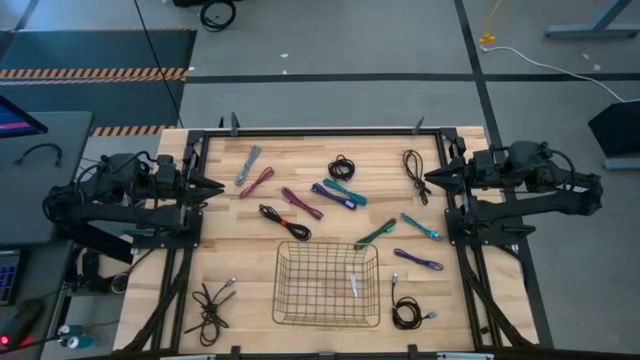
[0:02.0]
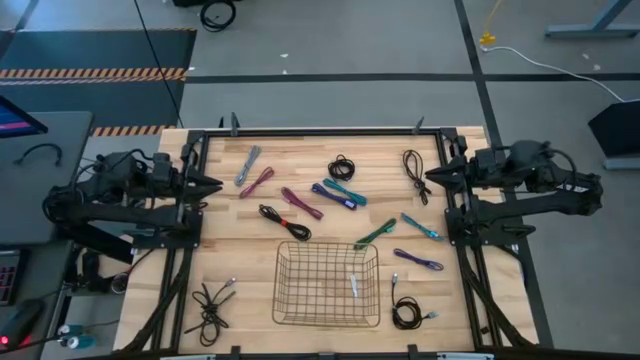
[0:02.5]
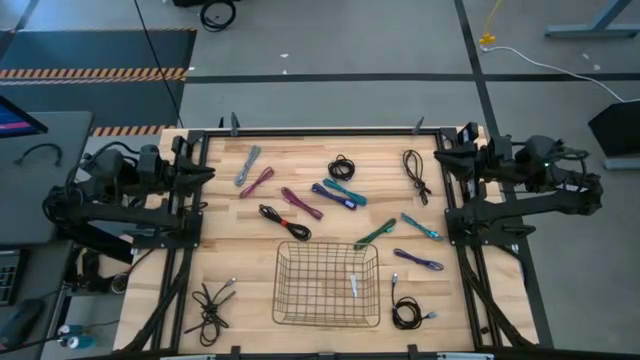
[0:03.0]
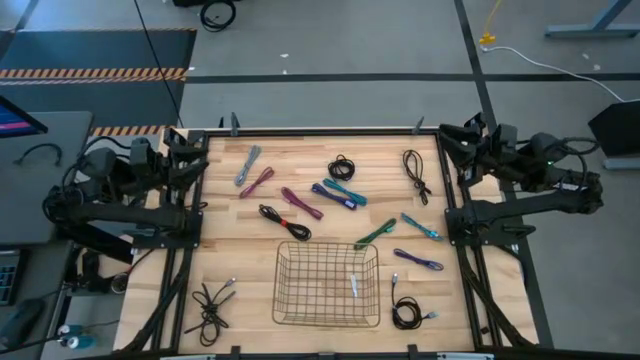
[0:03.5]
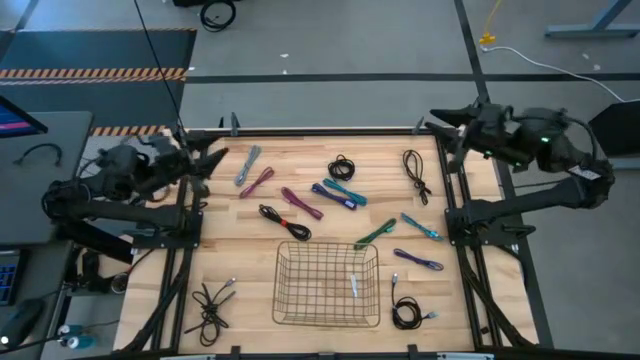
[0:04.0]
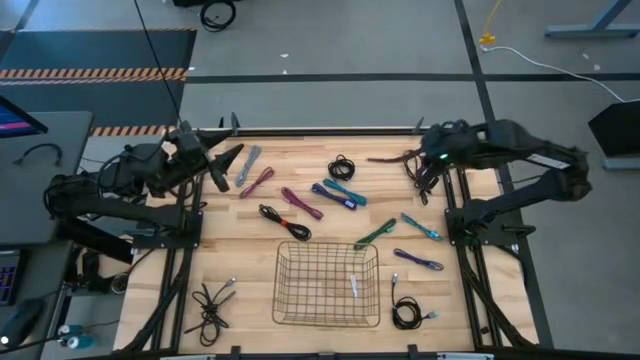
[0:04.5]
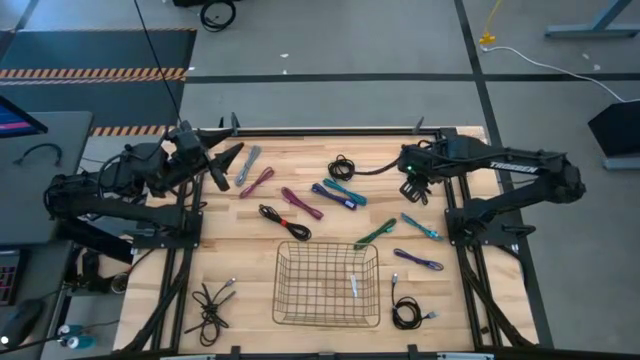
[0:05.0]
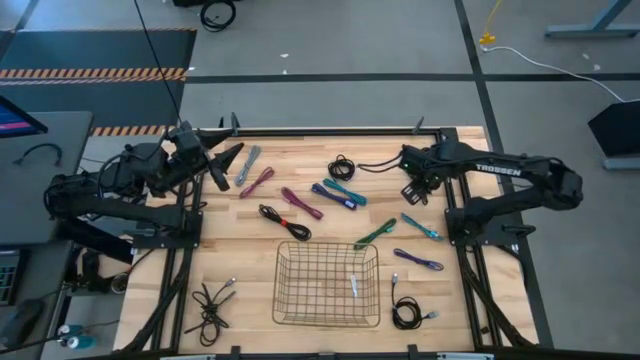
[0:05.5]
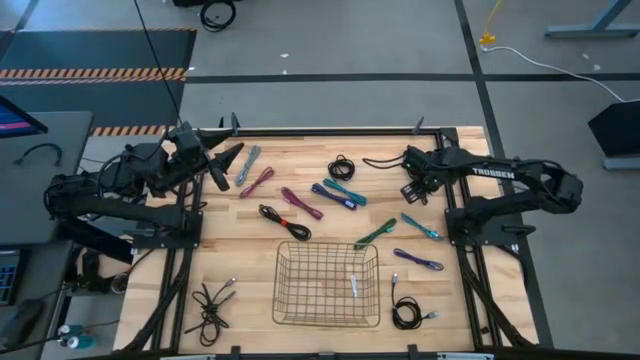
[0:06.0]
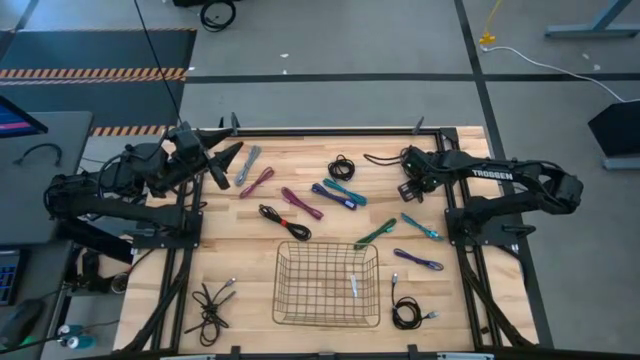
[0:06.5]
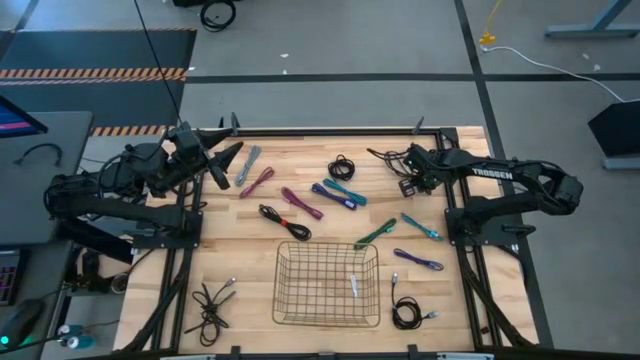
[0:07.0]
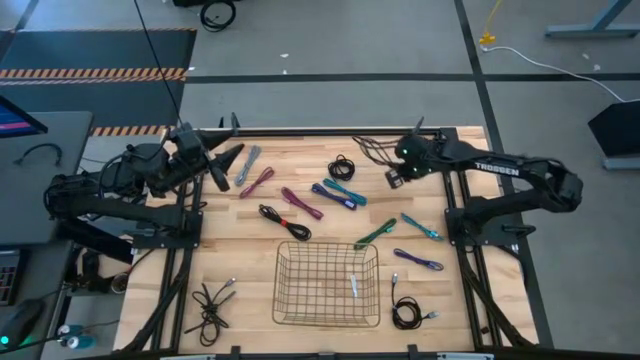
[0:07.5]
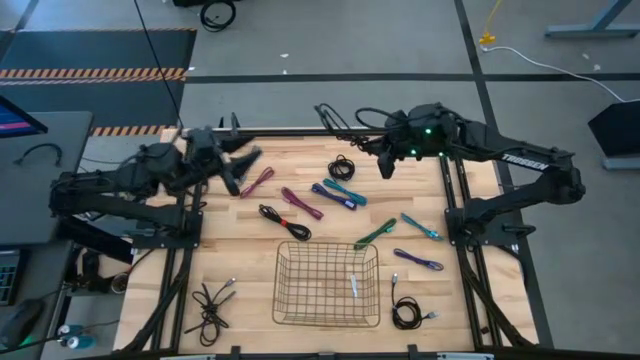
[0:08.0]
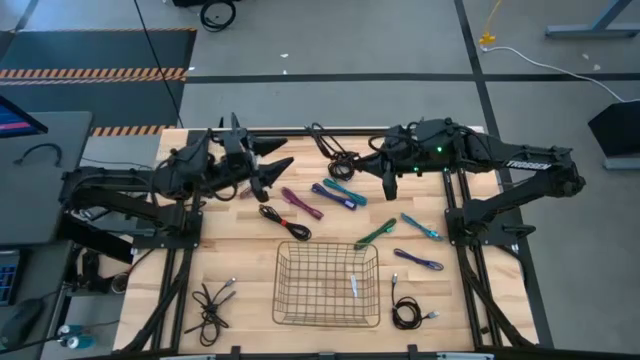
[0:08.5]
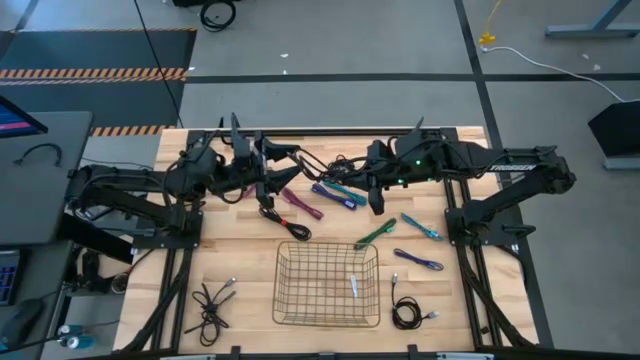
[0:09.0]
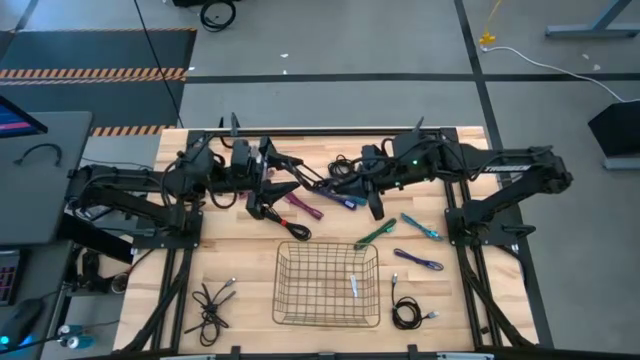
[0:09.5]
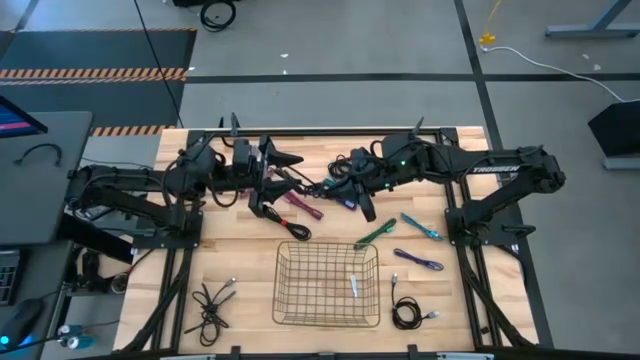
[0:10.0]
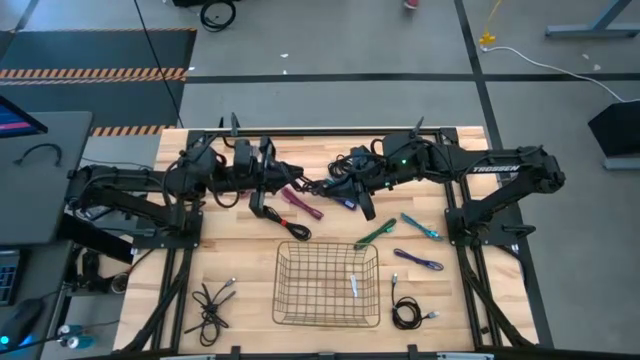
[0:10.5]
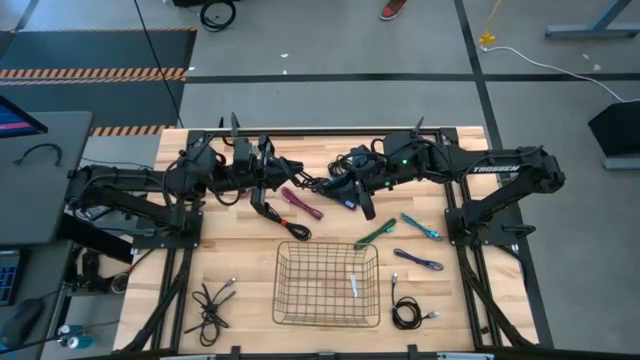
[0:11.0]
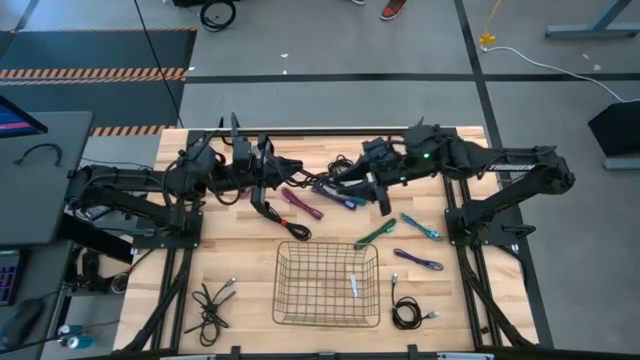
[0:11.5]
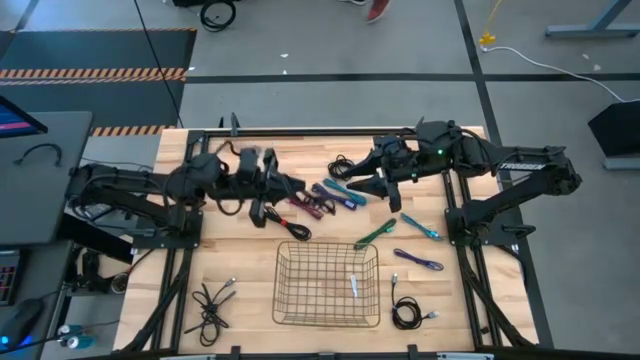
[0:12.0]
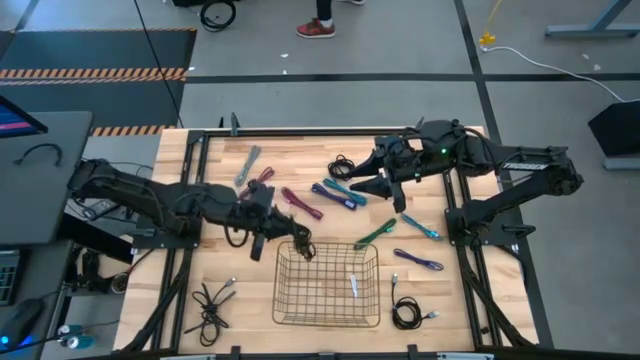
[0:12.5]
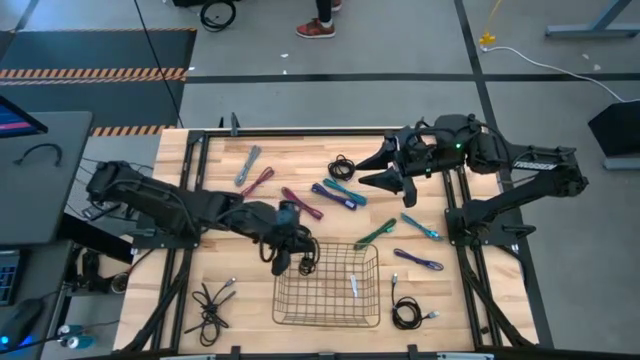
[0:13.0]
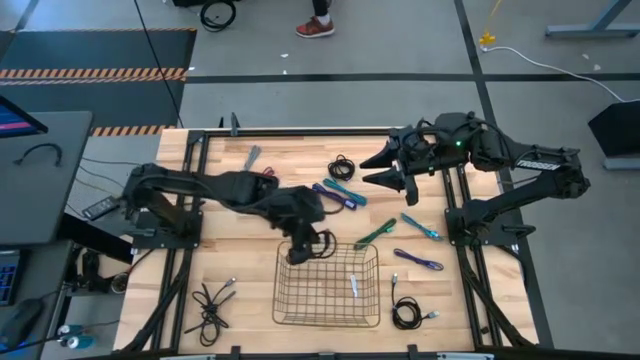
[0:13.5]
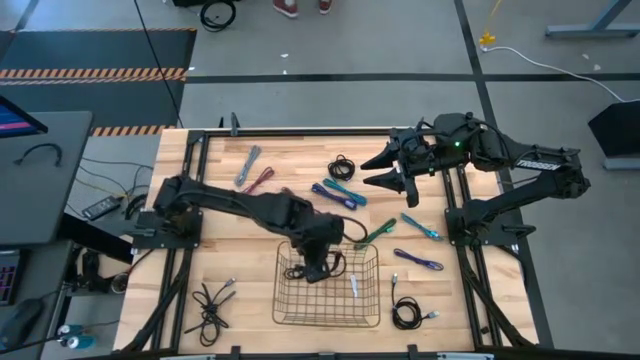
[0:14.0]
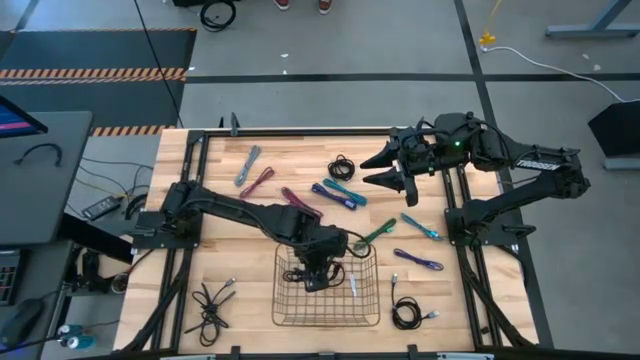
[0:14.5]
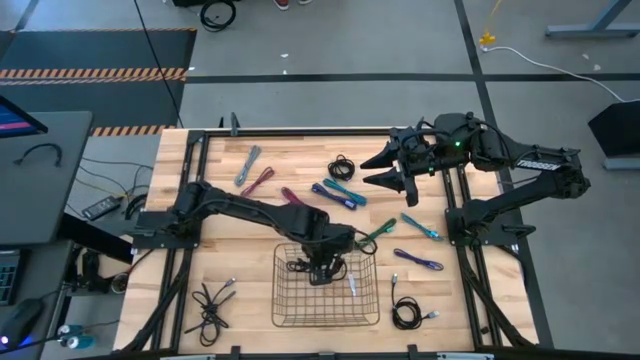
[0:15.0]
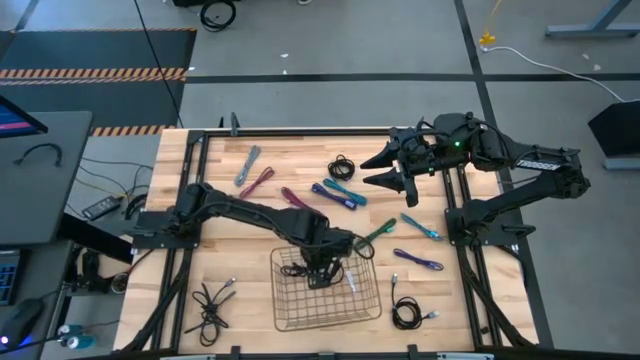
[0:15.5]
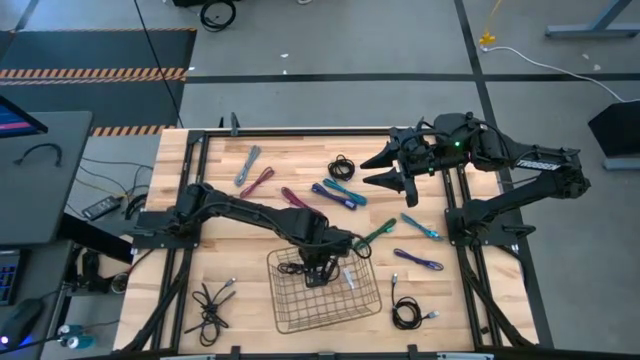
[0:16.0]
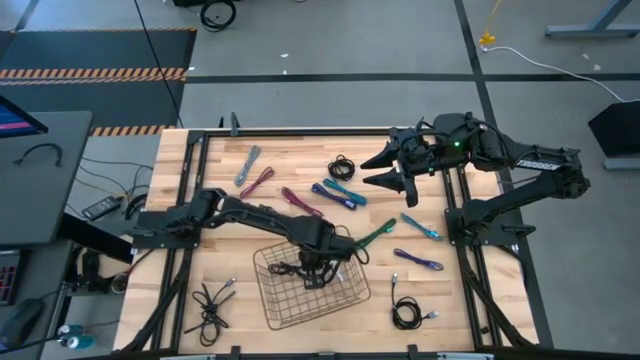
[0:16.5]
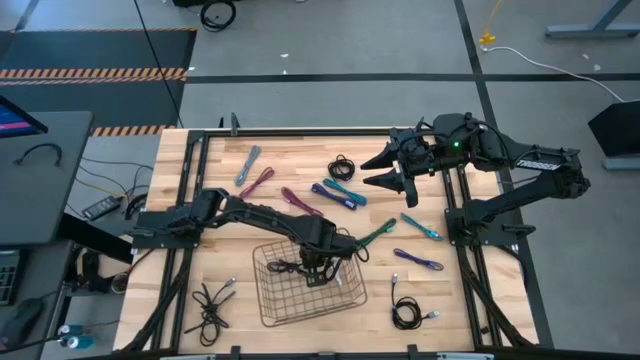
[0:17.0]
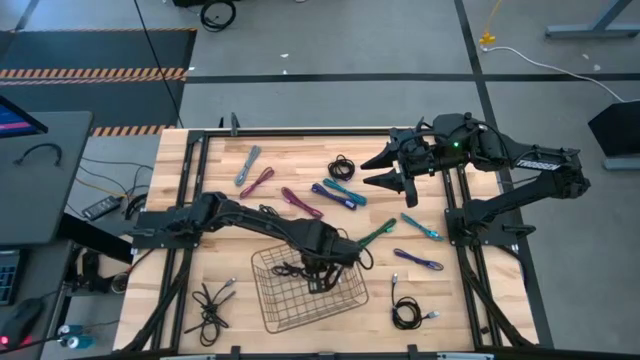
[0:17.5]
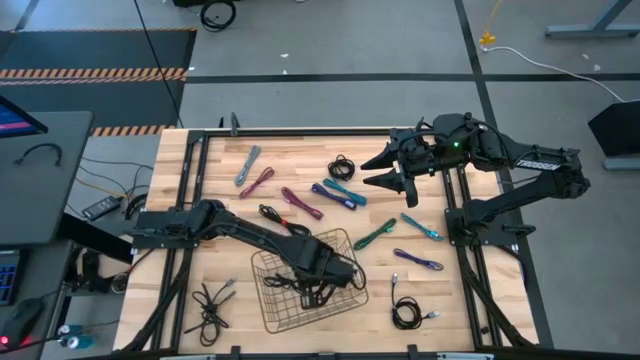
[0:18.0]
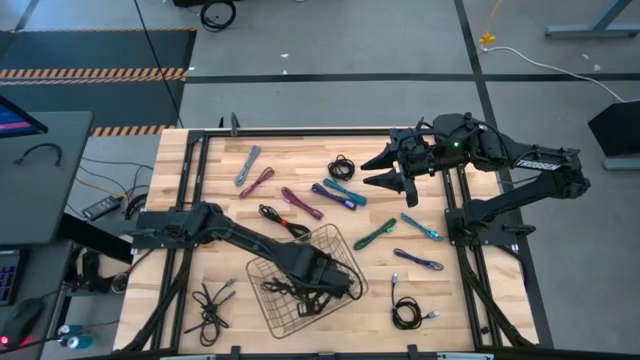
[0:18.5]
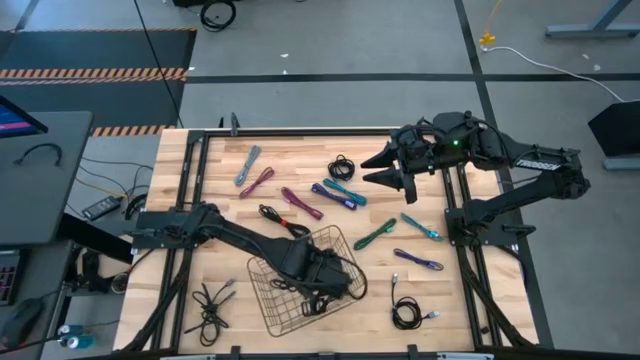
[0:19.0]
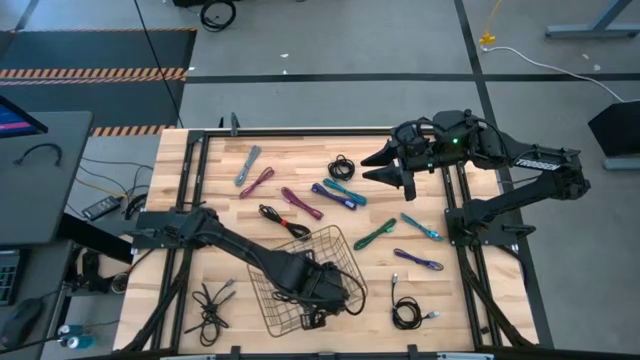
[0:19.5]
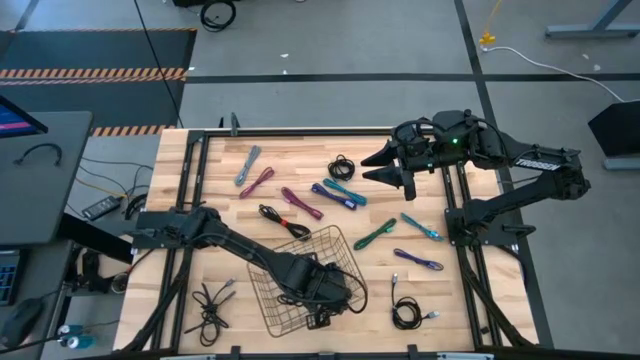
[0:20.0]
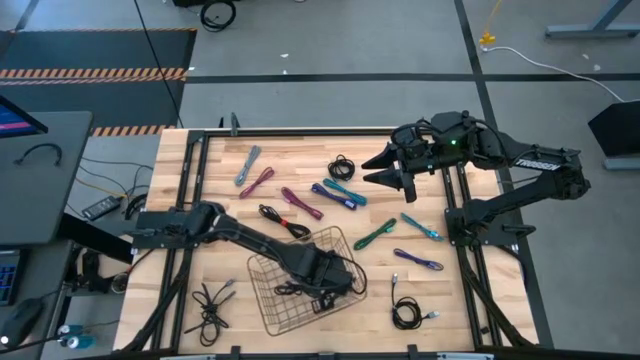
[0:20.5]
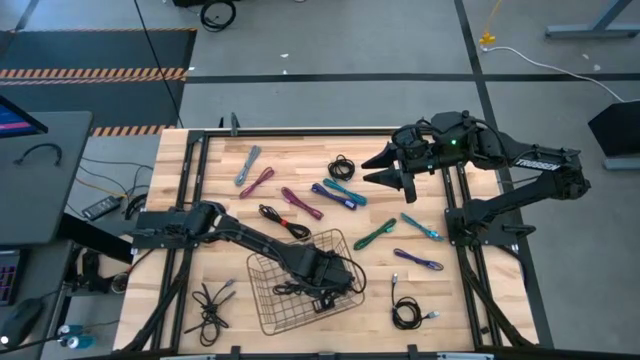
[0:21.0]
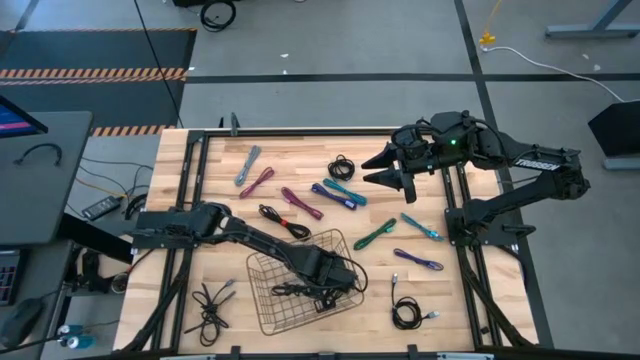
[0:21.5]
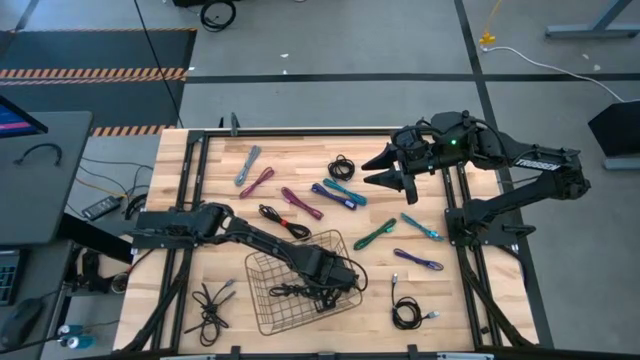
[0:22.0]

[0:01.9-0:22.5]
Task: Pick and place USB-C Cables
Put the black charger cable into the wire basket
